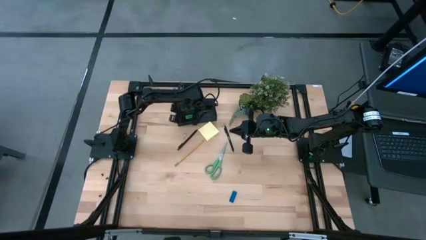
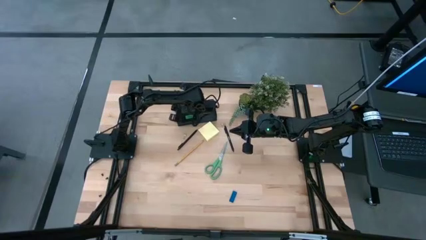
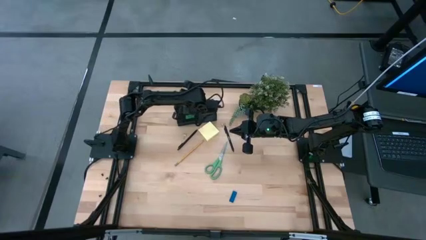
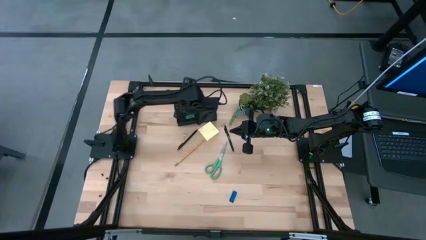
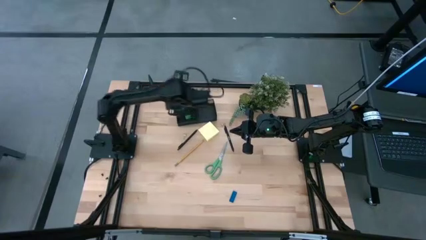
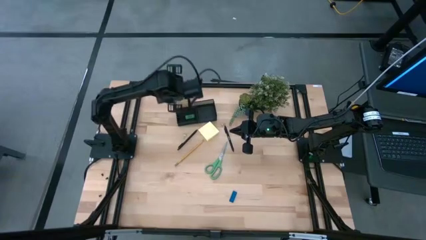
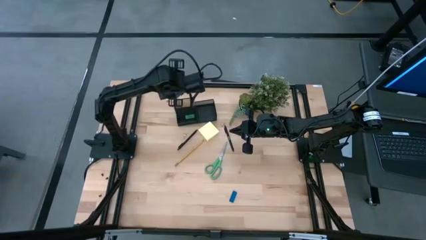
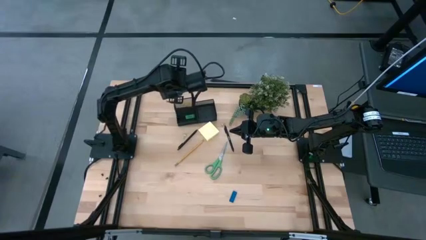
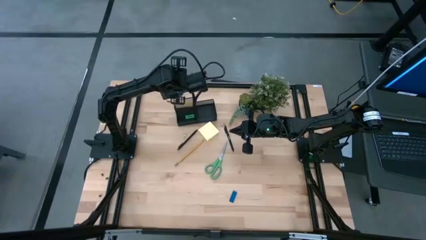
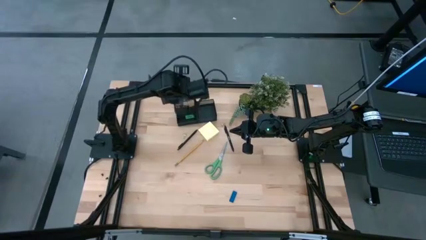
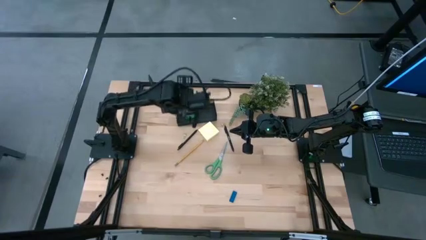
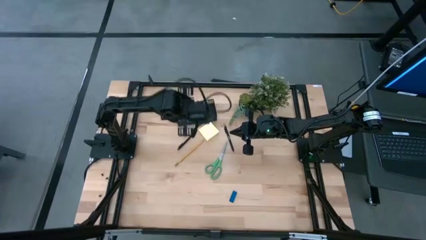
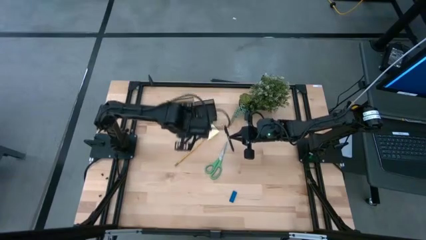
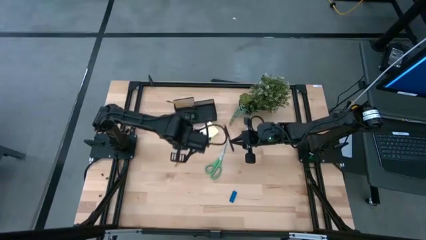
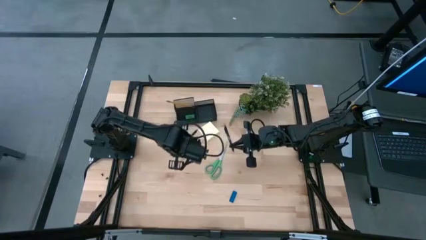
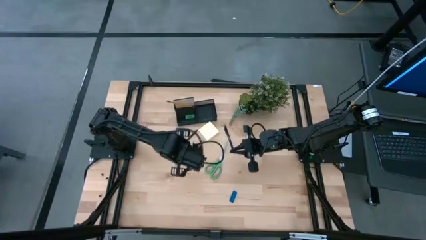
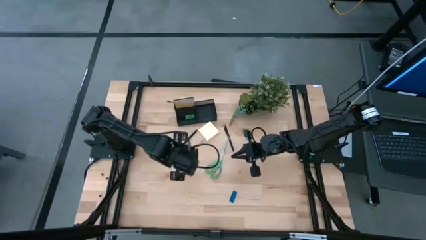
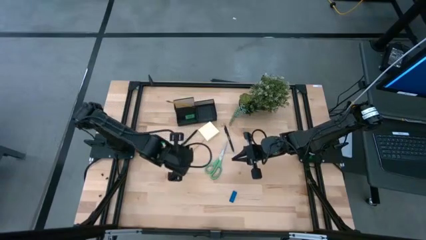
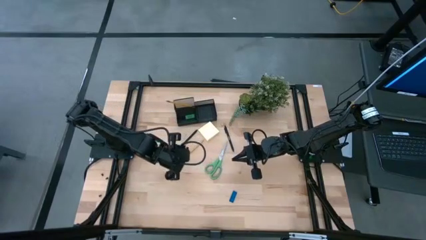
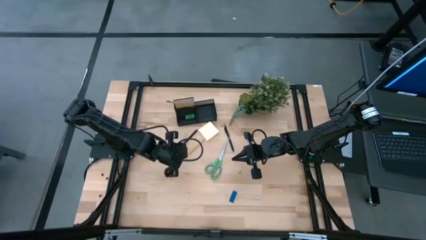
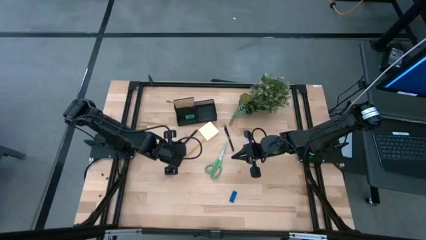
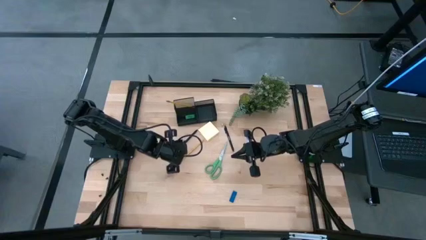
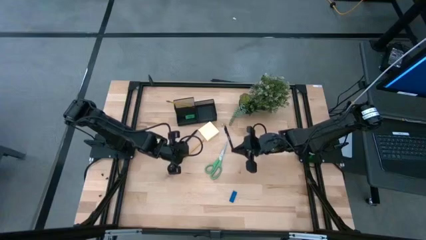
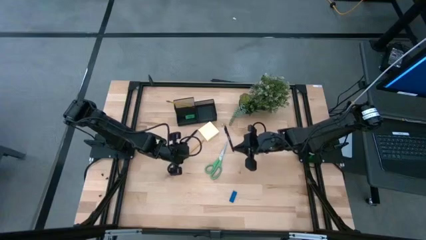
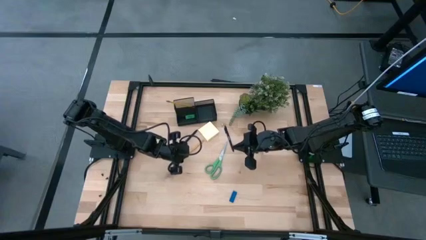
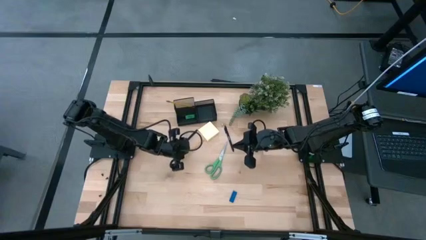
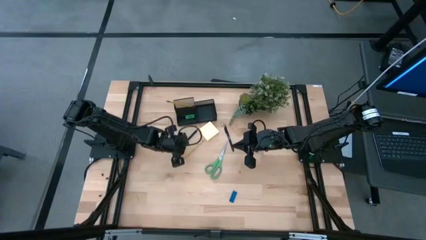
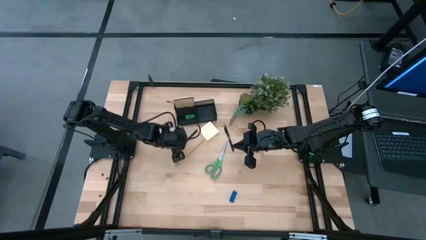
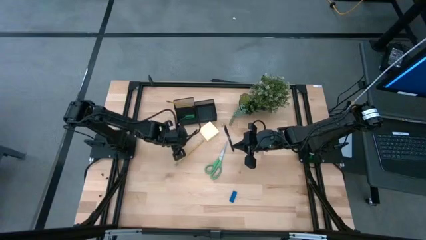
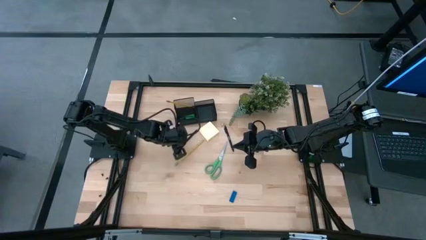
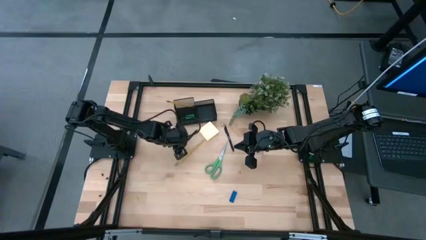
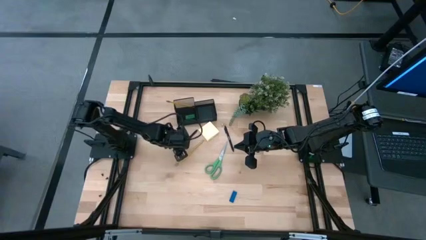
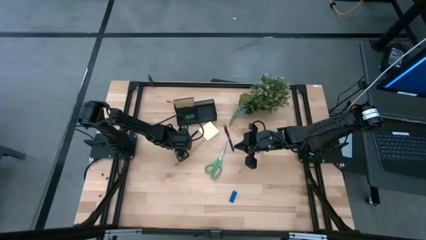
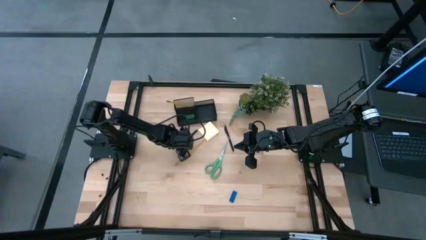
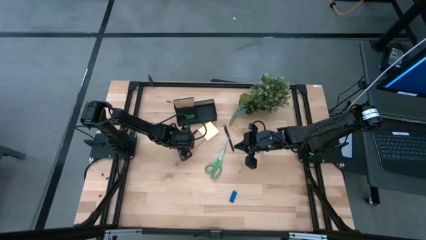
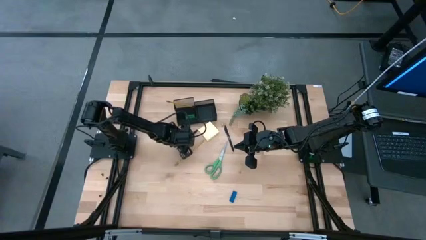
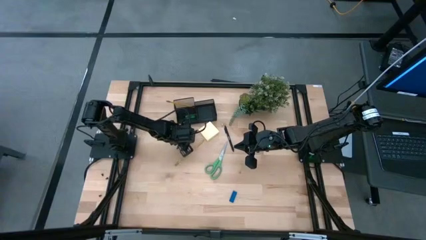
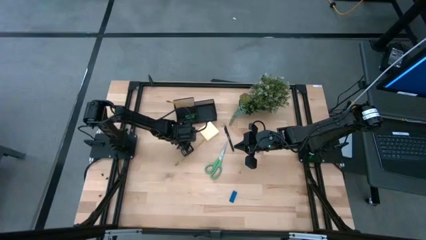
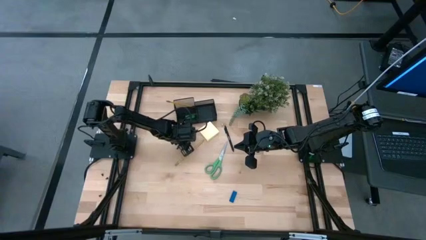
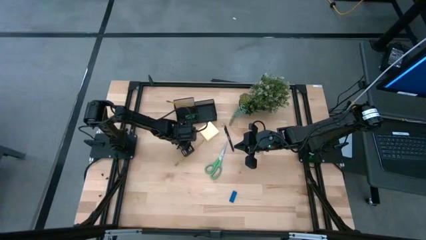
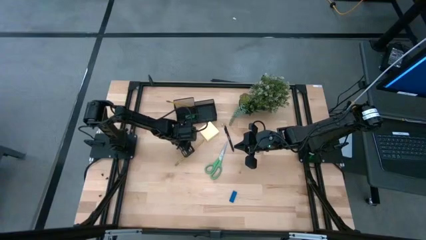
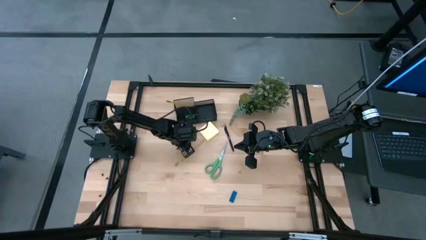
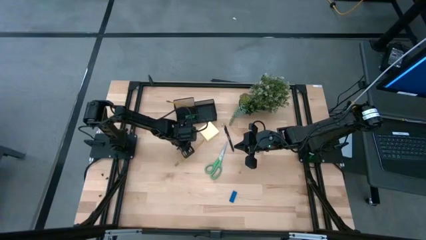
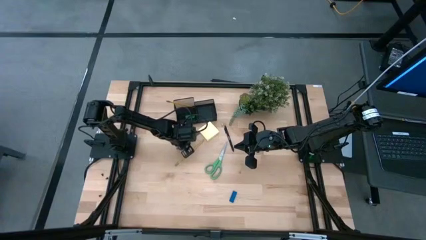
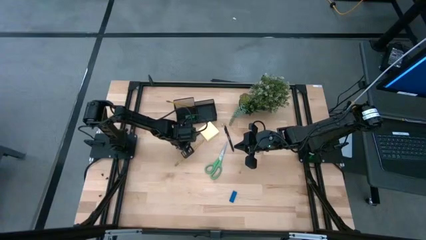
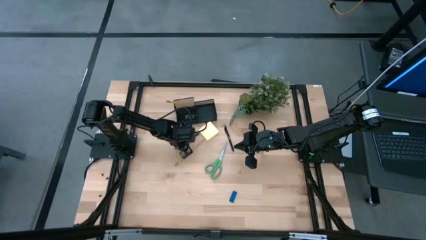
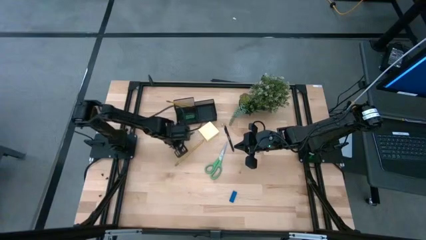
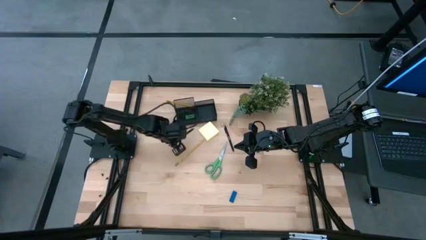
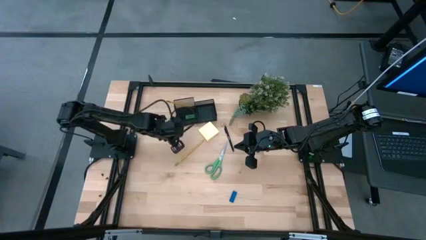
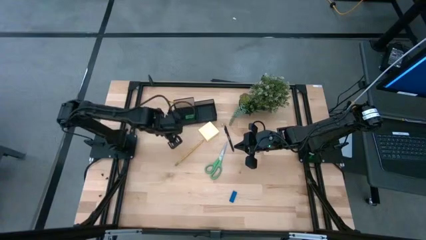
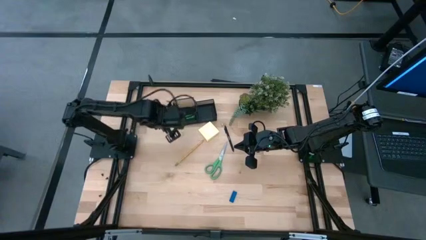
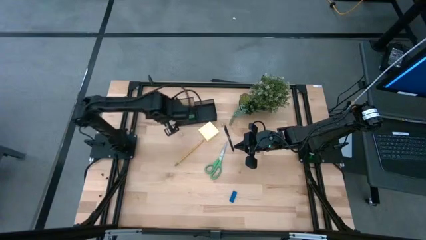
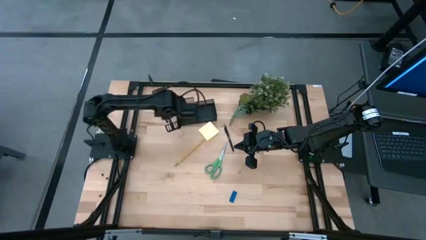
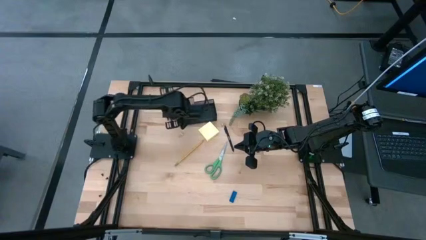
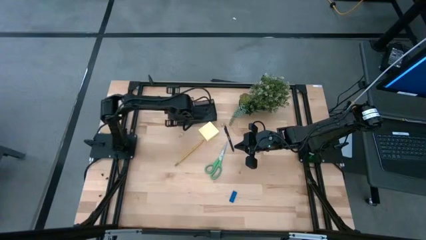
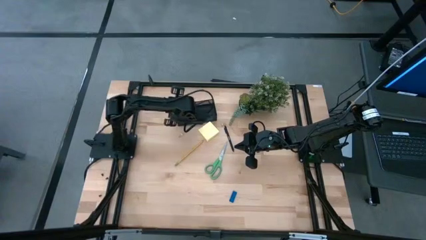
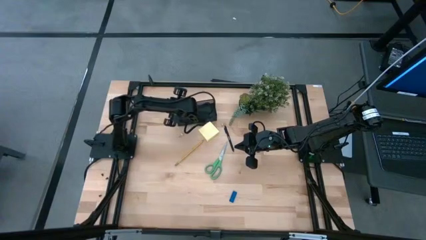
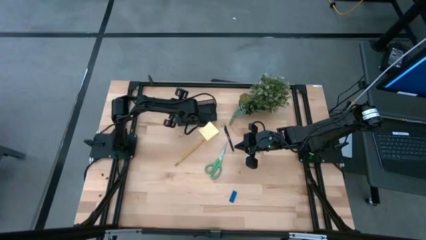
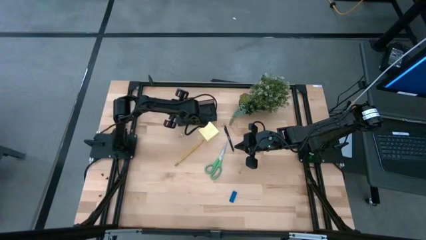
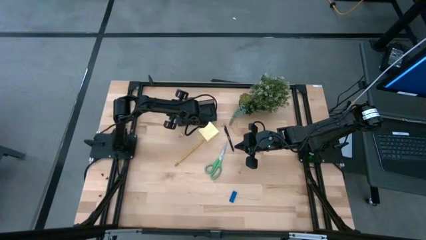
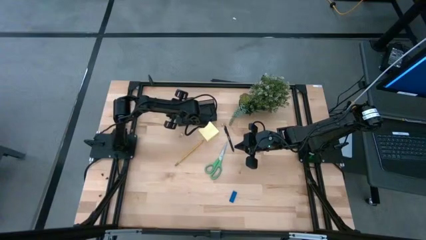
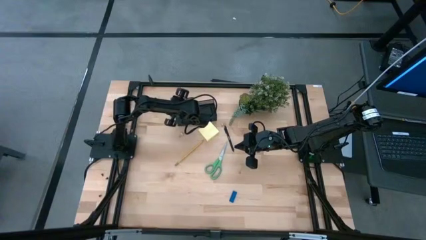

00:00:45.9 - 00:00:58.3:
Task: Pick and place office supplies into organizer
Put the black ballpen into the black desk organizer
